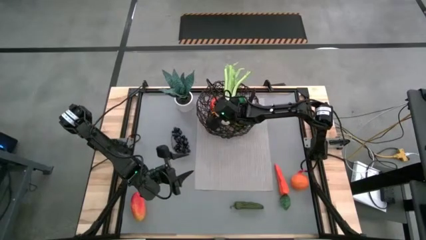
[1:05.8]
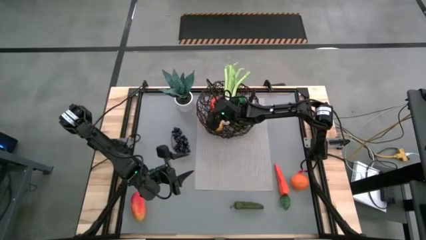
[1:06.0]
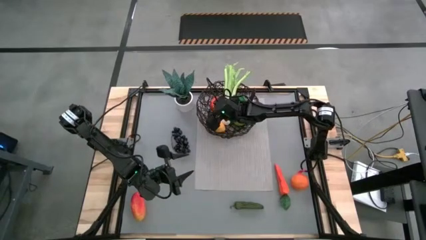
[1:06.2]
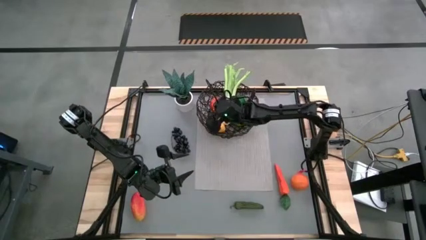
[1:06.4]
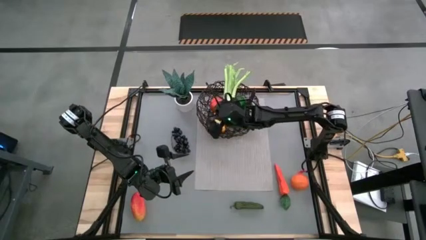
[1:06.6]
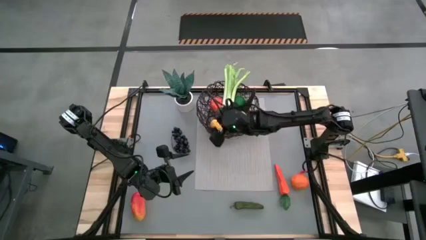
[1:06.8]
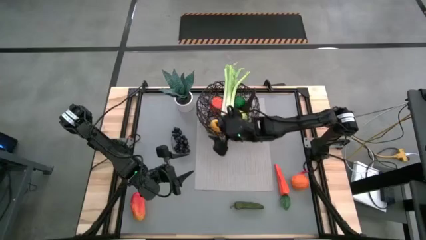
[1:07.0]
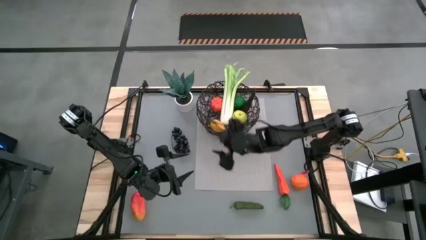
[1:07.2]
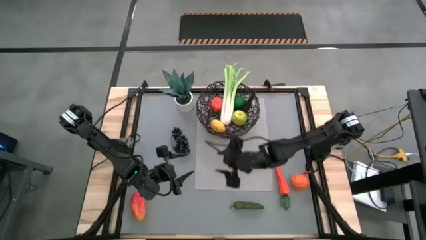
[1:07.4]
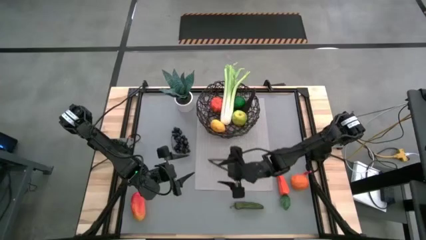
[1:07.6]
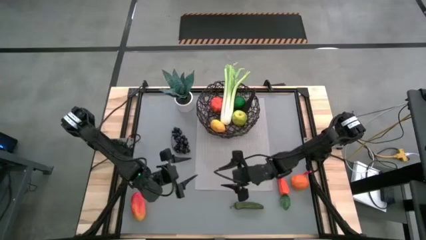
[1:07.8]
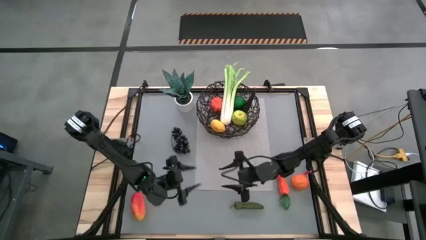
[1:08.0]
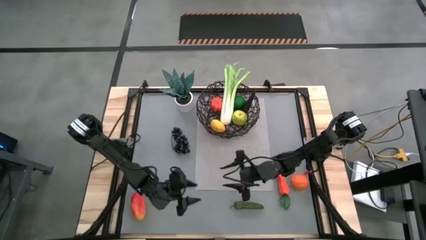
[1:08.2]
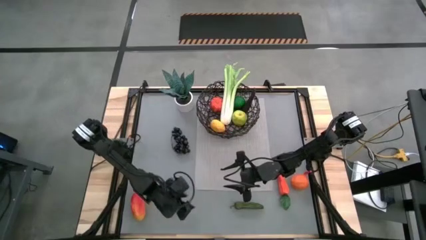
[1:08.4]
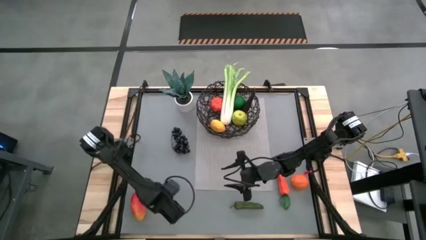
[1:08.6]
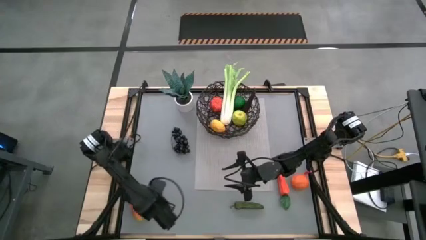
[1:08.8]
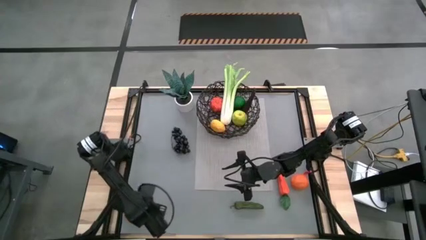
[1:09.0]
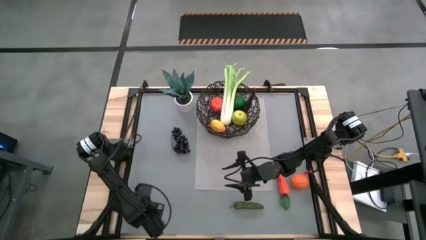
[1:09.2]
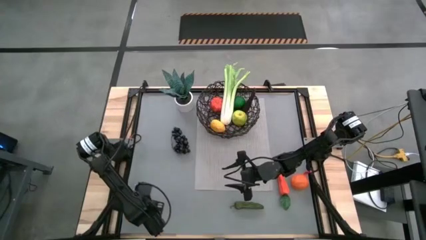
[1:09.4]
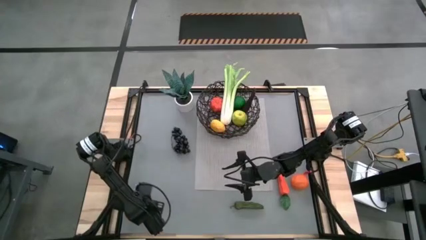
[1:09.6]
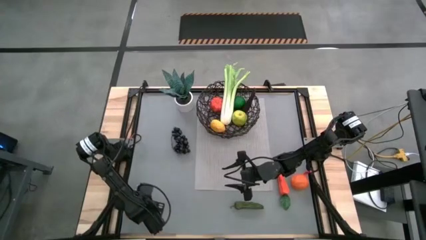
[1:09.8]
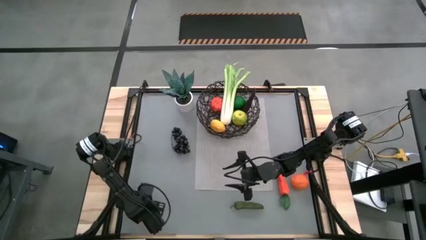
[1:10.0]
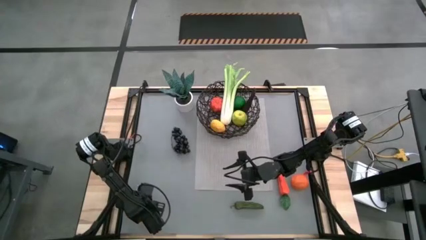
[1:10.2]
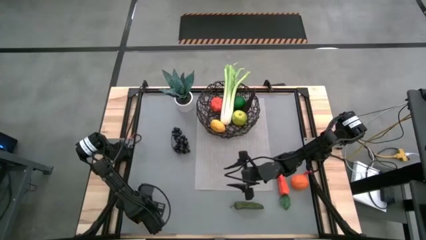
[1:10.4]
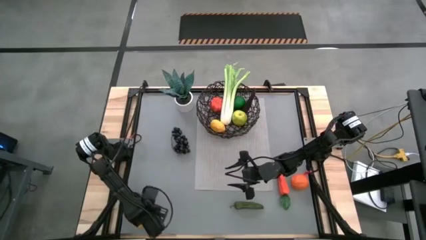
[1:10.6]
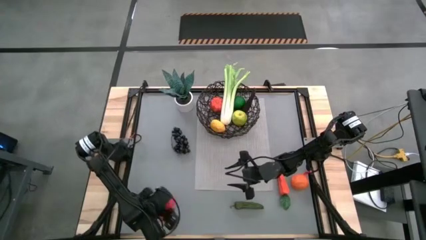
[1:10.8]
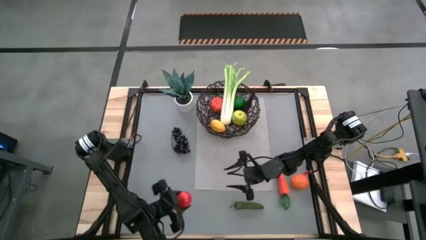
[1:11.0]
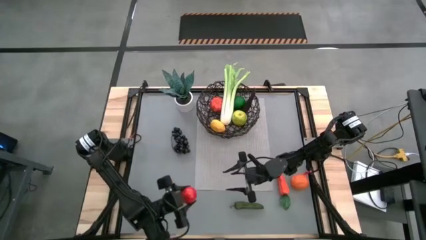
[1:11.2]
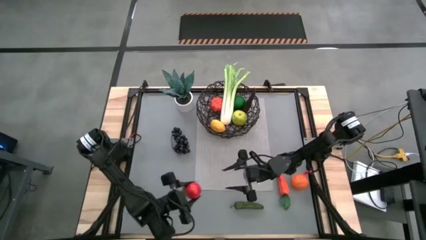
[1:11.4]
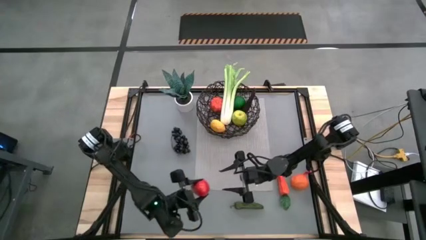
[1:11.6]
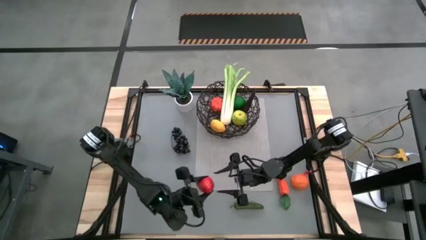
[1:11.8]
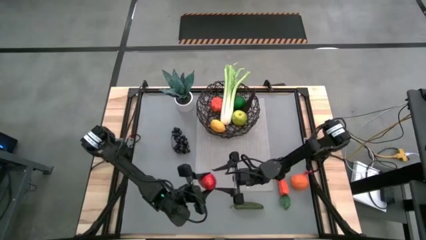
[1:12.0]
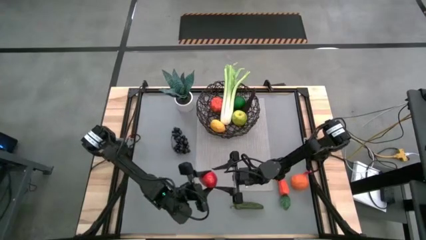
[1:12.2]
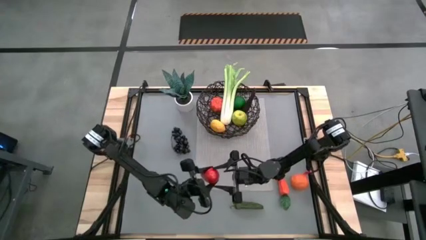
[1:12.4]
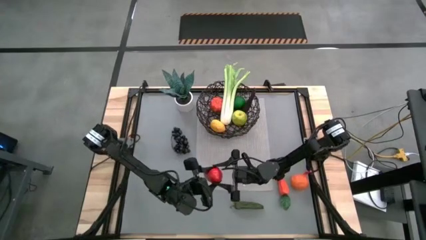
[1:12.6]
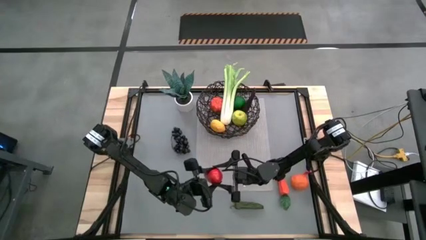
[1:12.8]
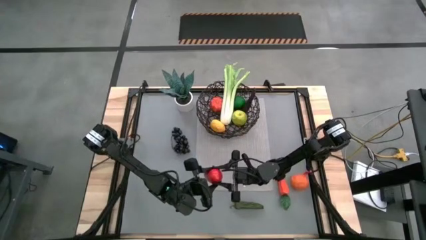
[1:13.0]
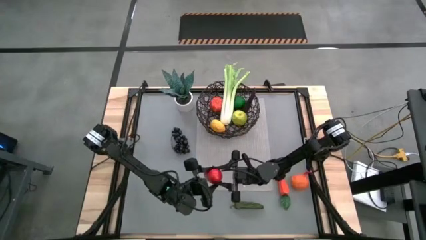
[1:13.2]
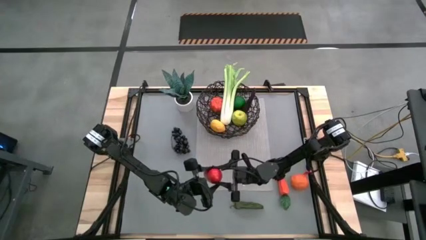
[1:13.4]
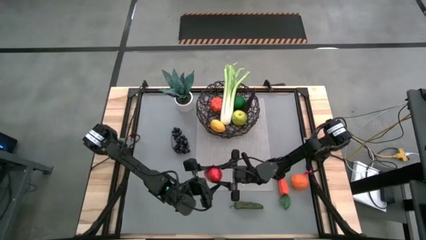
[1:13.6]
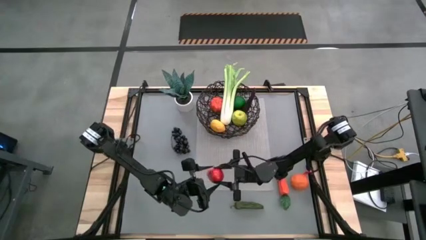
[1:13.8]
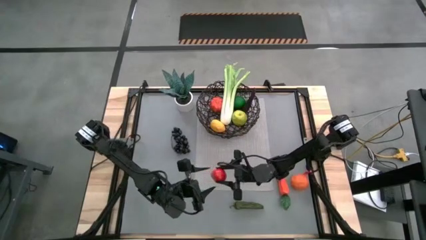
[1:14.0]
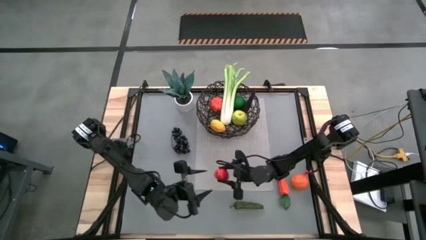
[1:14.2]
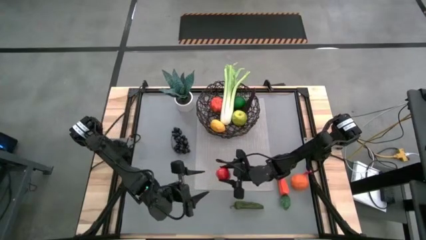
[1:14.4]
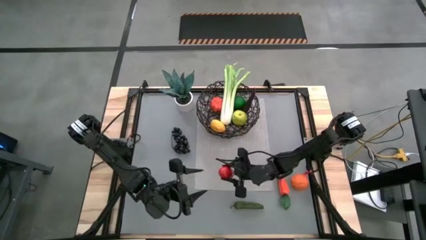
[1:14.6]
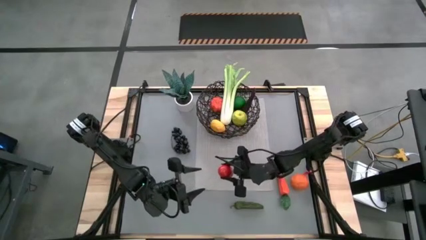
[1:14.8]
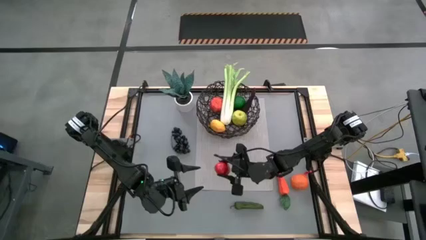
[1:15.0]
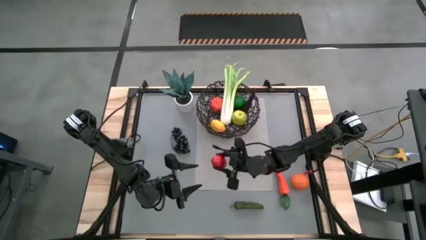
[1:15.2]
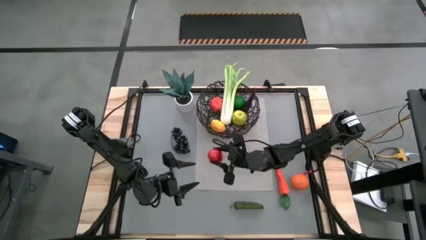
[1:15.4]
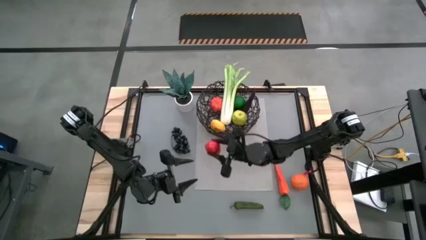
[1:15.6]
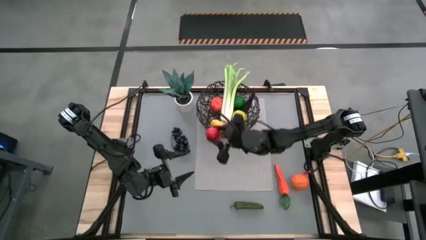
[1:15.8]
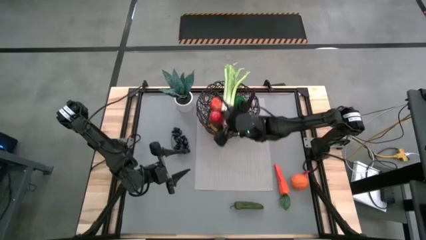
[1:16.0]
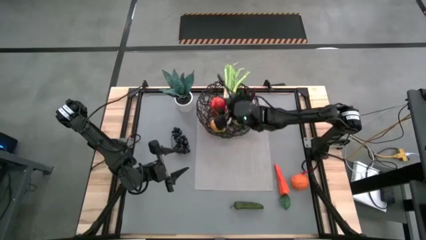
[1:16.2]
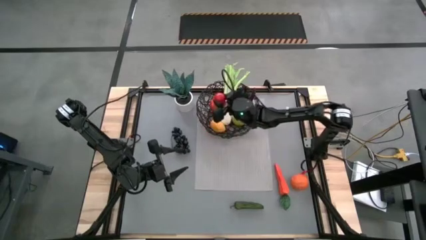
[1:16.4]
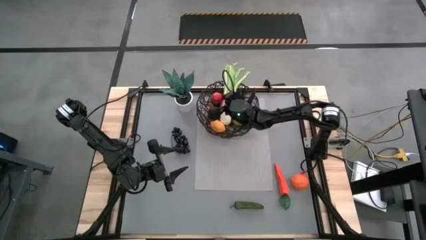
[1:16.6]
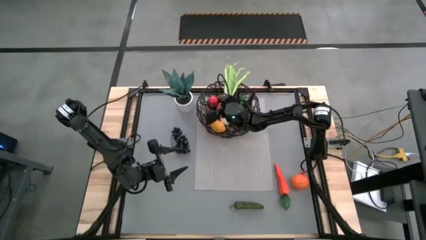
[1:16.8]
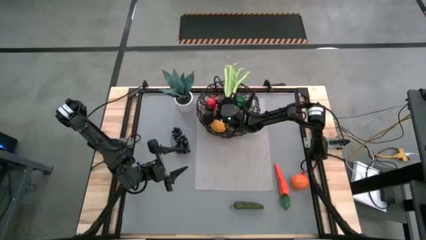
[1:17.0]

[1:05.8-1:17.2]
Task: Build produce basket
Put the red mango into the black wire basket

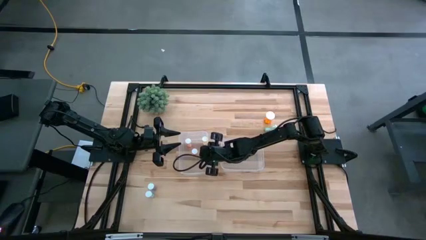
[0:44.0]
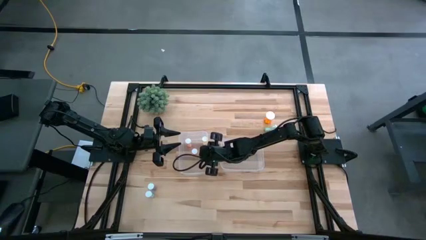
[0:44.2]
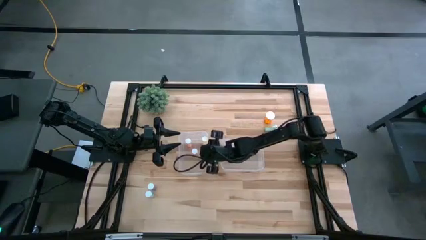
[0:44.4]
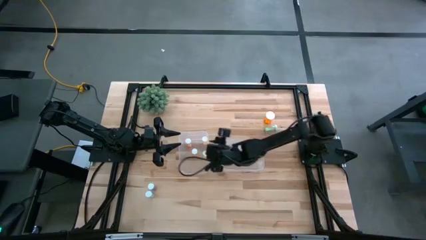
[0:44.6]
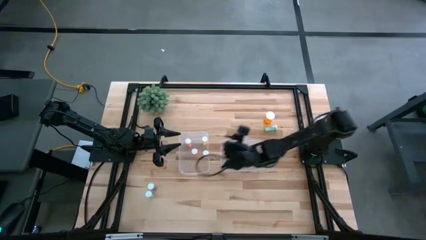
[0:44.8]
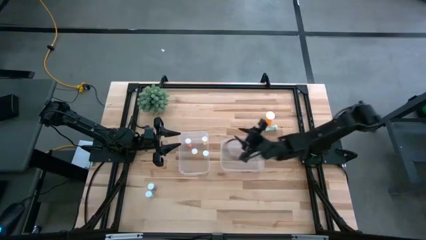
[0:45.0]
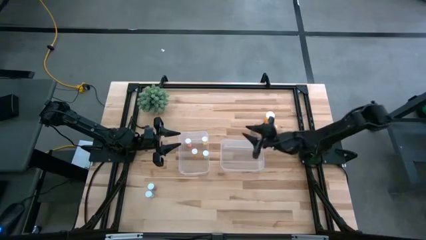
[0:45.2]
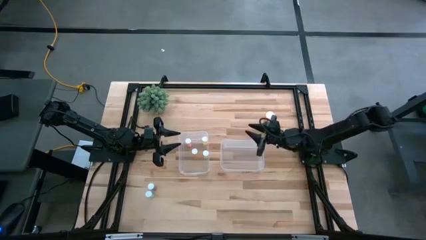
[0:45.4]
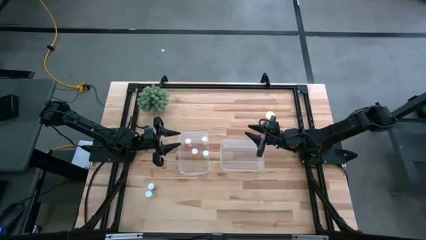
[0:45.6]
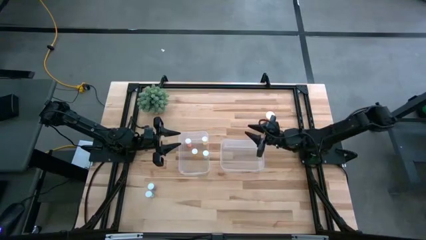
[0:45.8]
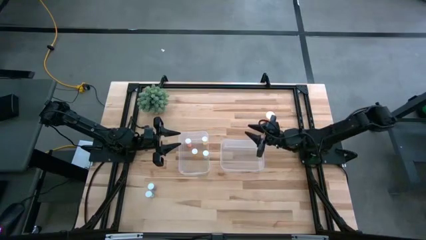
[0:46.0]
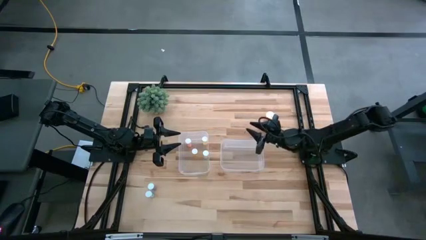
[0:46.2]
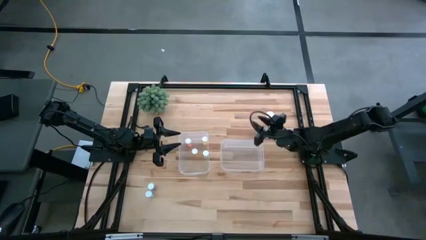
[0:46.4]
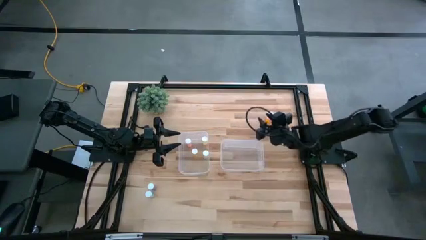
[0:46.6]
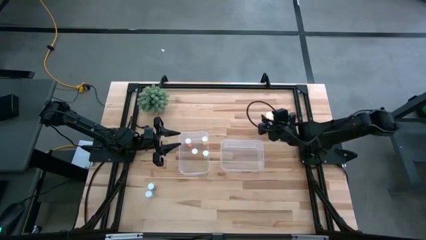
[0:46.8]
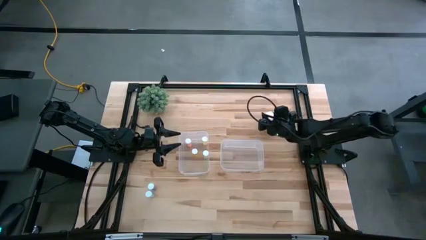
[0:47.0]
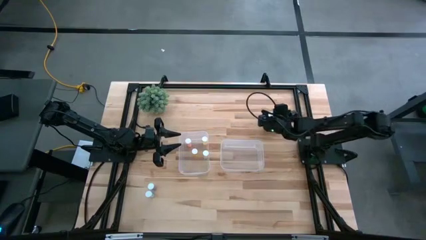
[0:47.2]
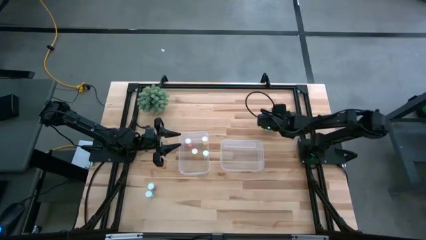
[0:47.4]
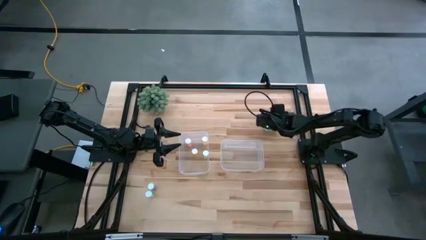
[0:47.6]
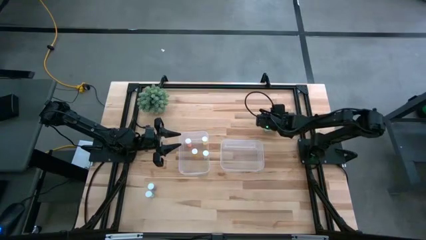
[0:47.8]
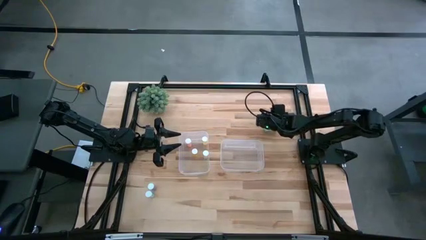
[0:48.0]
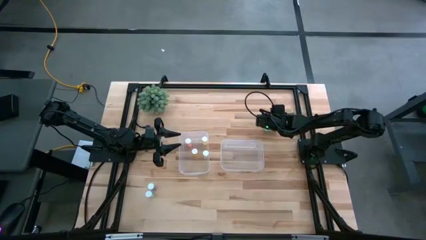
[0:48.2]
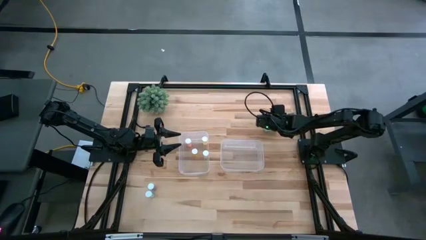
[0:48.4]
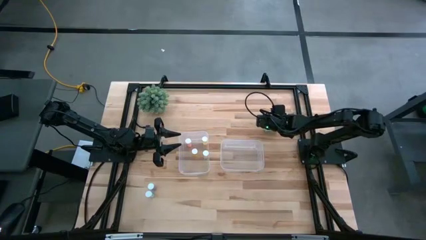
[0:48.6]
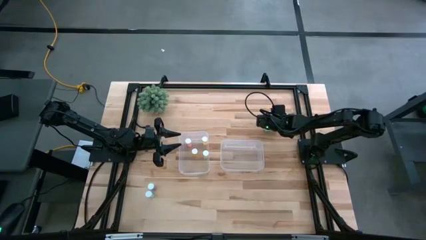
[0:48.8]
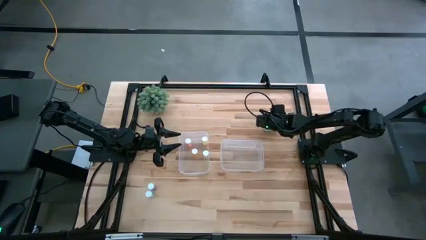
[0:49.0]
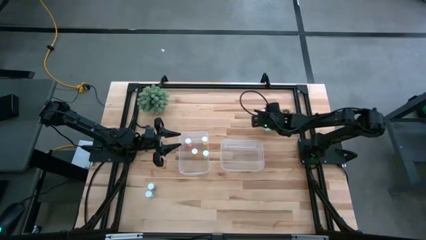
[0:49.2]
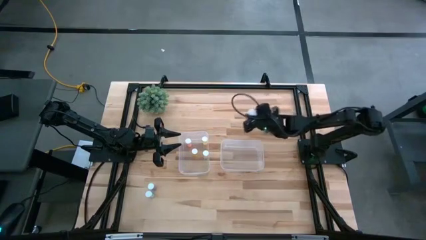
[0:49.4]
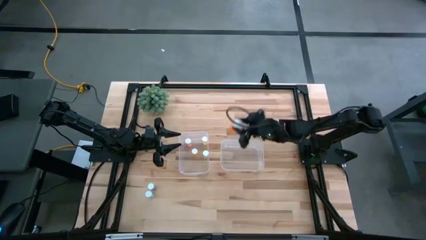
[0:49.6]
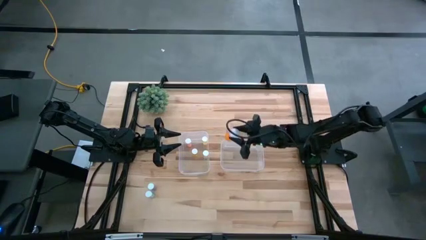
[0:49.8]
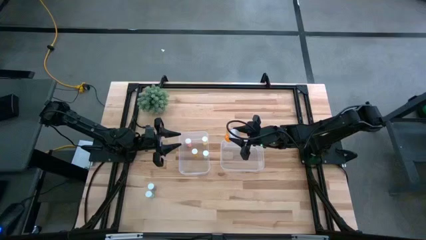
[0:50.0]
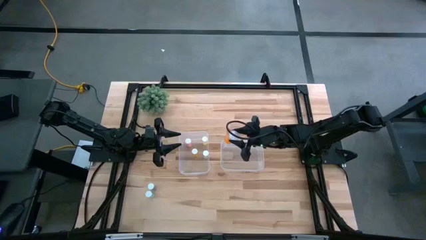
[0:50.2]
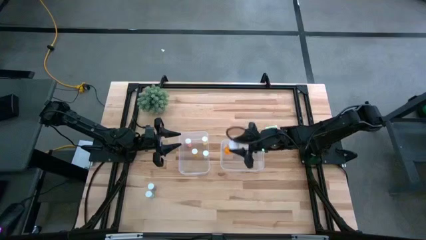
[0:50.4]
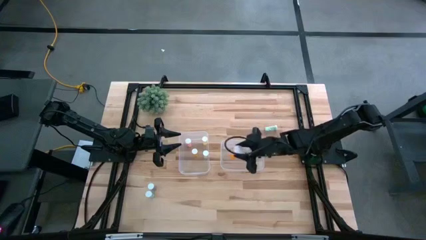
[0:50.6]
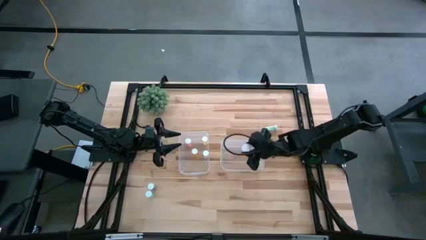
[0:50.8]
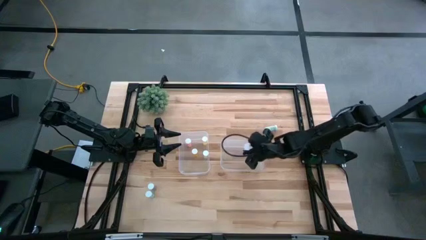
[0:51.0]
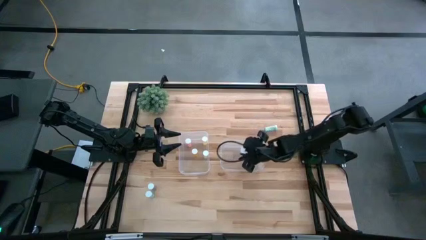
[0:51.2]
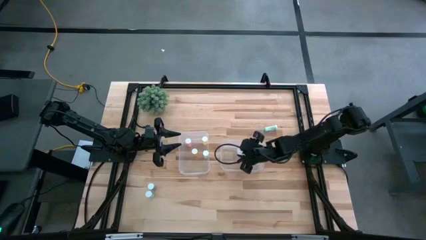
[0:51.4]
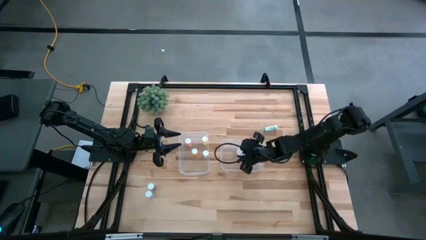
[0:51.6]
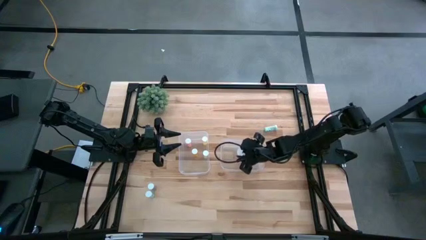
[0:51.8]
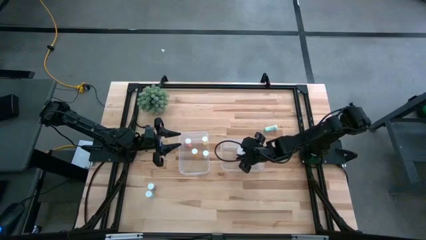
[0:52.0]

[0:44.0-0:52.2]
Task: Pick and place medicine bottles into bin by pill shape (circle, oval)
Put the orange capsule bottle into the right transparent bin
